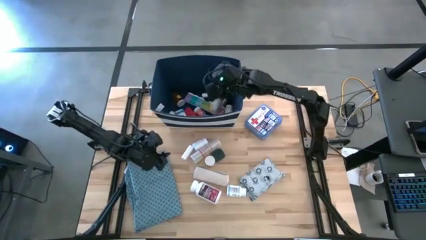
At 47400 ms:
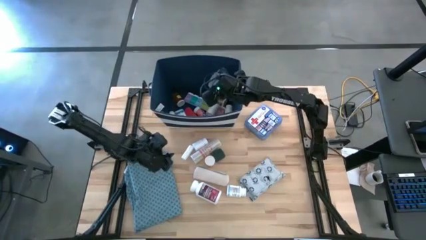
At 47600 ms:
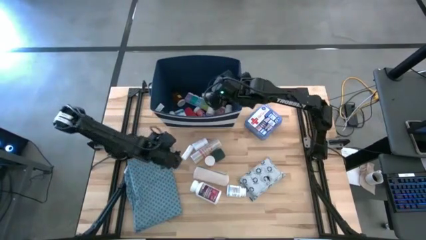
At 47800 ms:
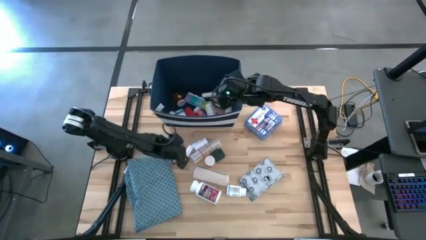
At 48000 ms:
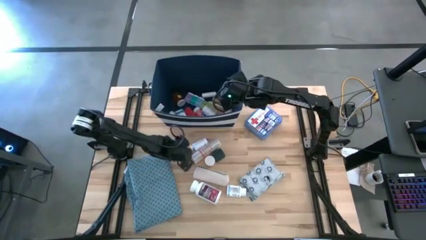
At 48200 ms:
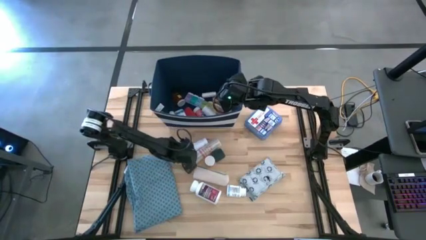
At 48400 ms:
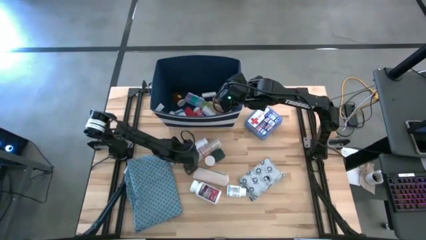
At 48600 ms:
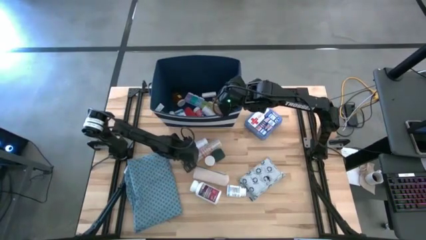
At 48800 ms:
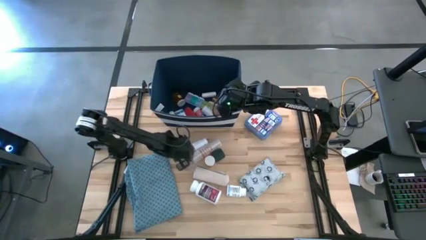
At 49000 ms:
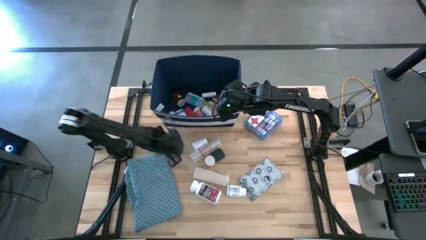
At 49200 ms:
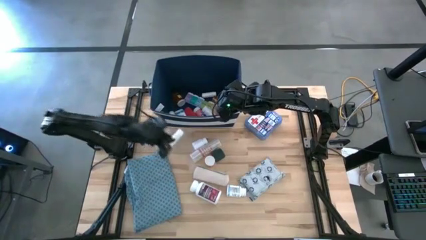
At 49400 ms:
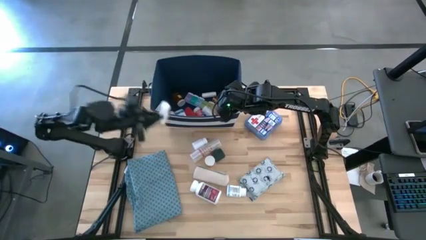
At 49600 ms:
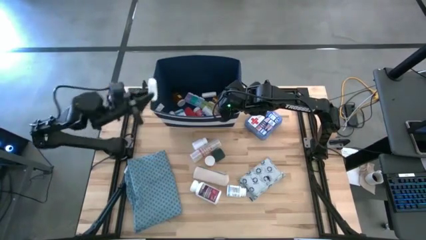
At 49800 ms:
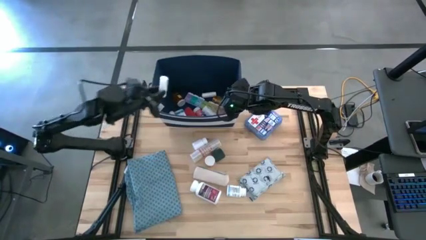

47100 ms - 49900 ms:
Task: Pick & place medical supplies in basket/bin
Put the white rolled gauze into the blue bin

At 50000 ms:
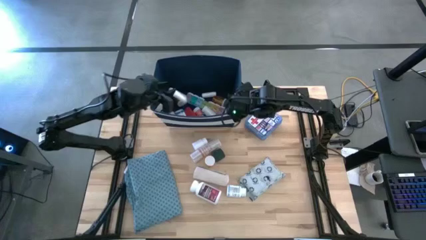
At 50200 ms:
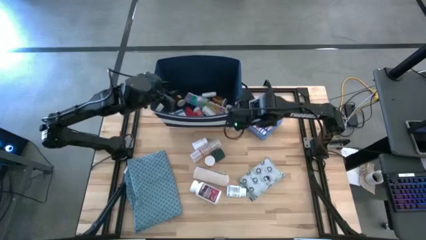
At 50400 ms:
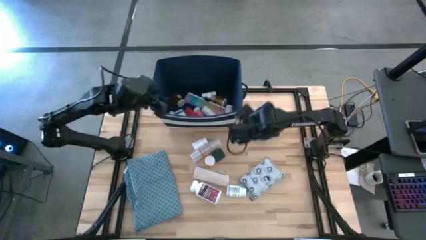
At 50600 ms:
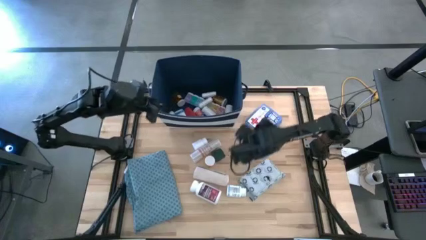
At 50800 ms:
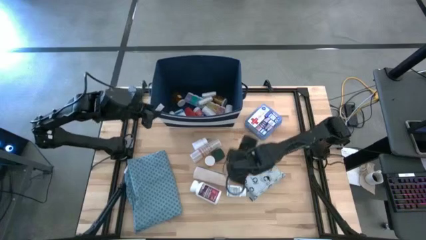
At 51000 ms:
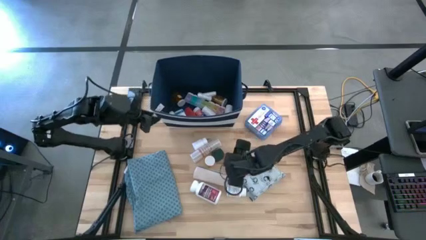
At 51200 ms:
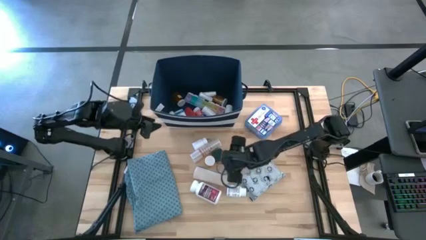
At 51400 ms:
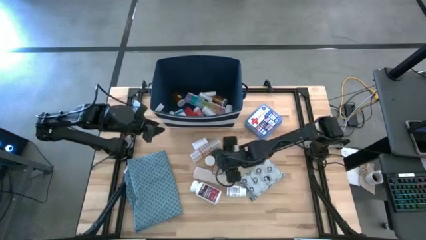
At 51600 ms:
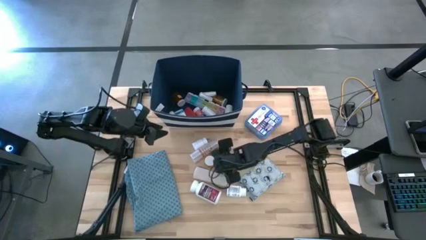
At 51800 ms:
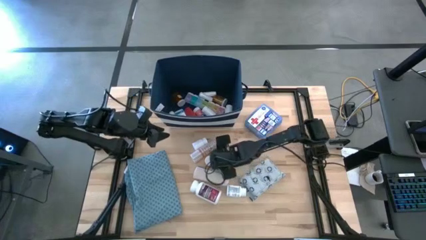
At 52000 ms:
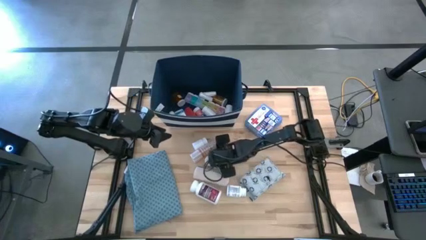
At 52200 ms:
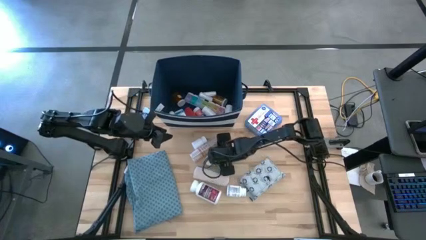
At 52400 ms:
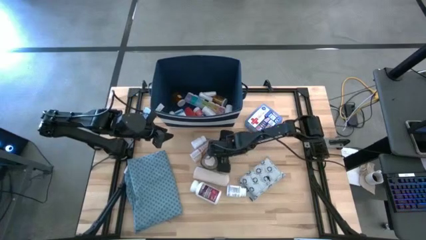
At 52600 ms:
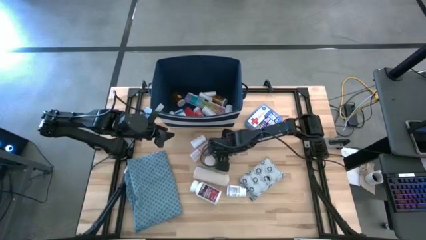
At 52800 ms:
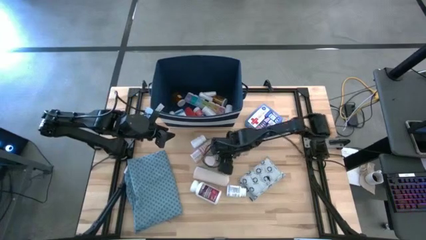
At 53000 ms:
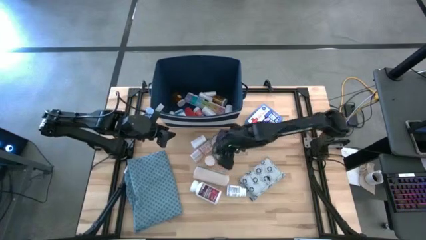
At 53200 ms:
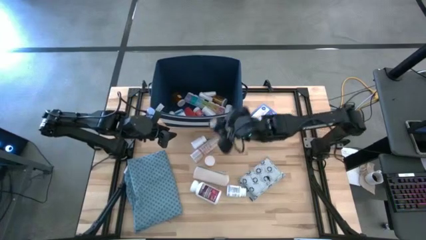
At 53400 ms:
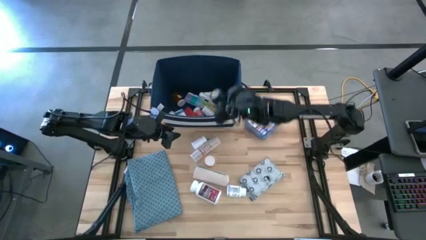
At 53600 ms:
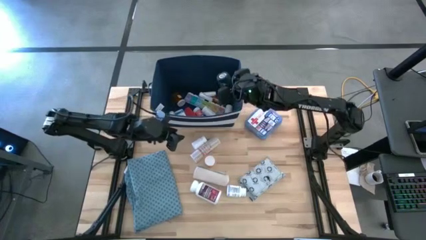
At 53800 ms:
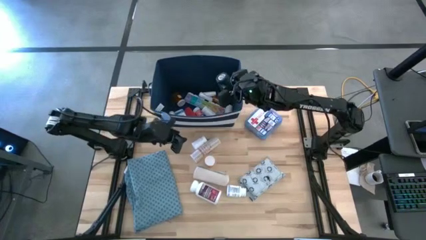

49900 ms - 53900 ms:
Put the green bandage into the blue bin

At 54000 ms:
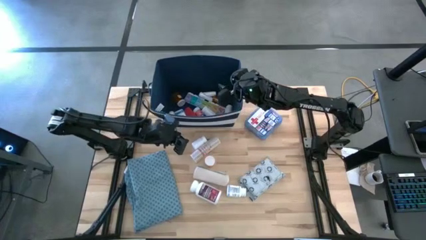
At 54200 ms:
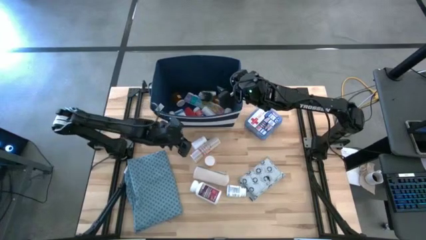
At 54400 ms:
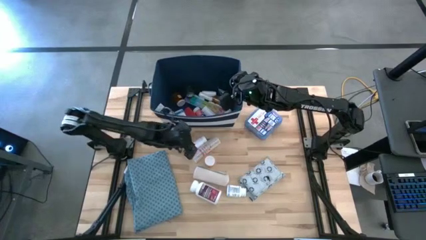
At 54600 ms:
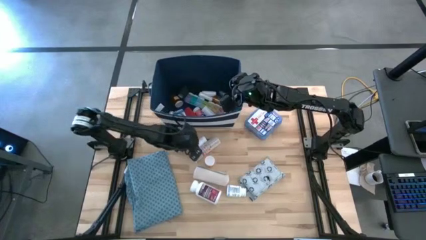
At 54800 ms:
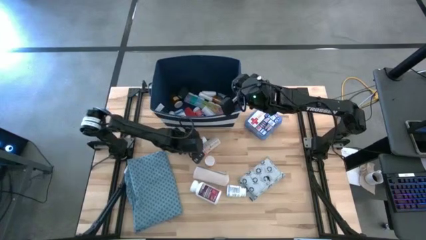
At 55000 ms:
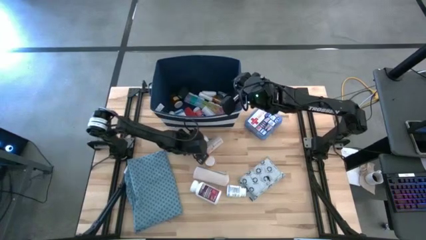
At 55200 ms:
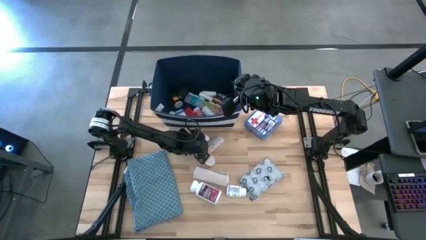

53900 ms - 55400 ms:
Put the small white pill bottle into the blue bin

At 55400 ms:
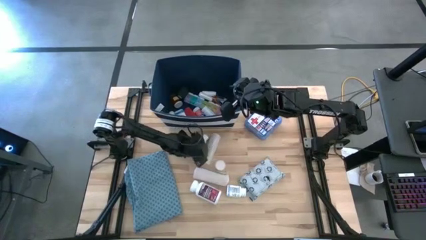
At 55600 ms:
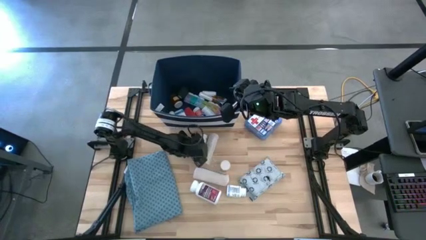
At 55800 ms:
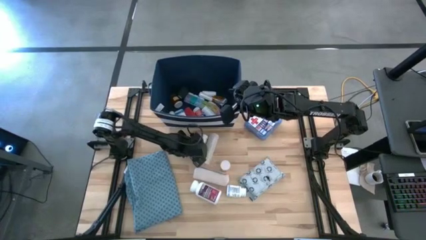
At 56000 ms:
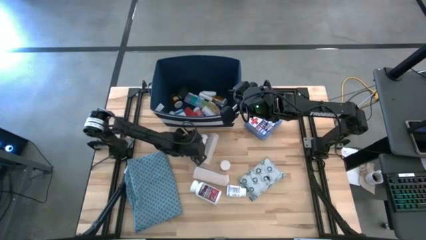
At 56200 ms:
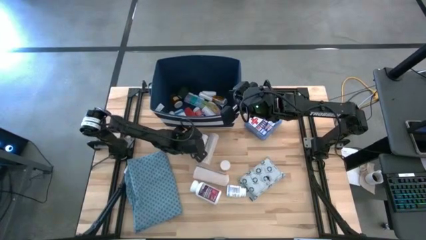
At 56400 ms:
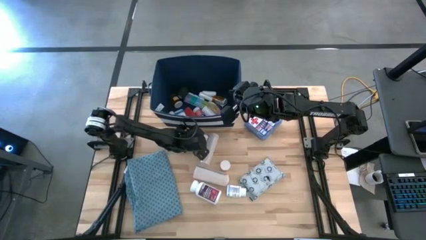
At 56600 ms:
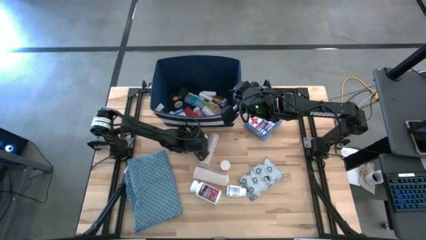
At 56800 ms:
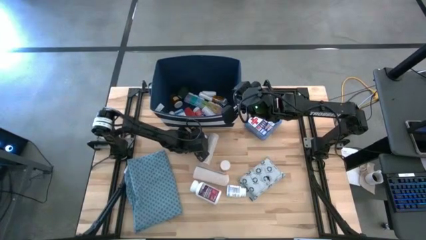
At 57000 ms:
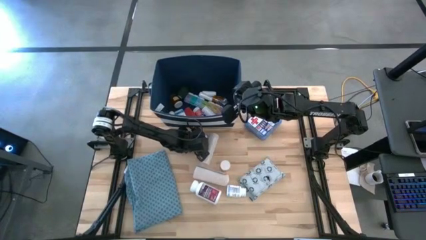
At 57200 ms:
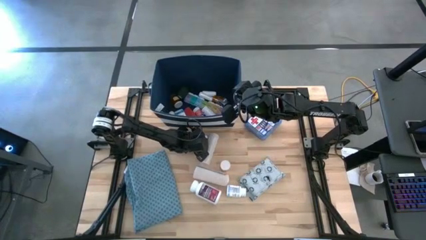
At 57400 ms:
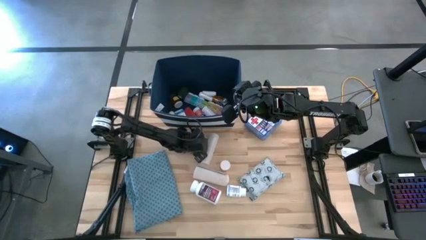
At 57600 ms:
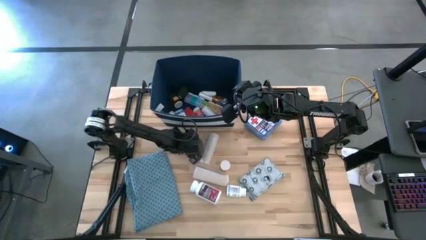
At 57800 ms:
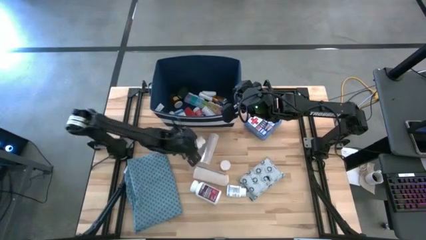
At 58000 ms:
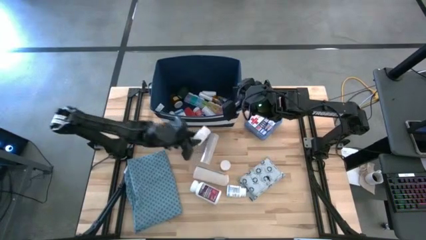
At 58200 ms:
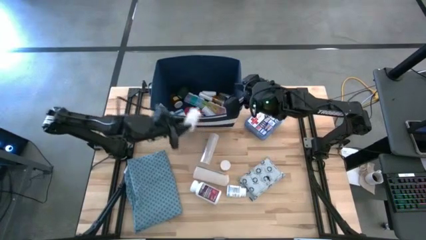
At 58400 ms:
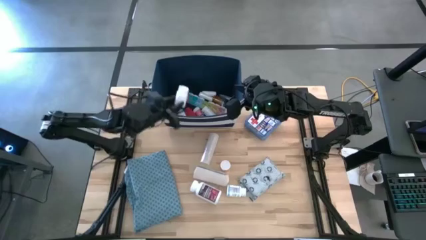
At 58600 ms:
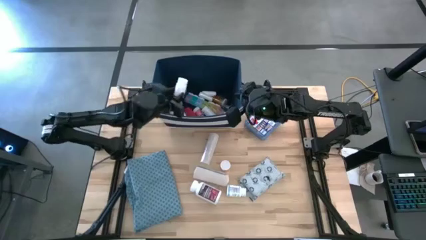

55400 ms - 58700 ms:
Put the small white pill bottle into the blue bin

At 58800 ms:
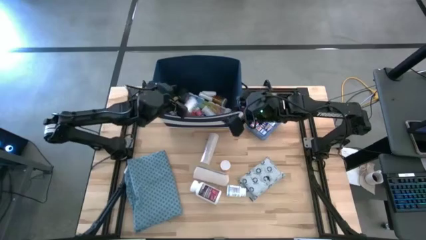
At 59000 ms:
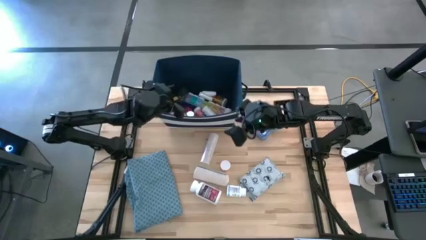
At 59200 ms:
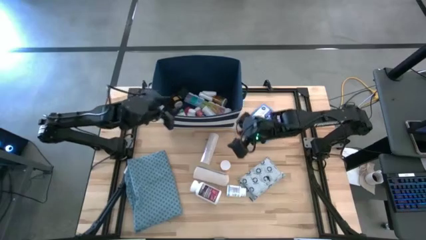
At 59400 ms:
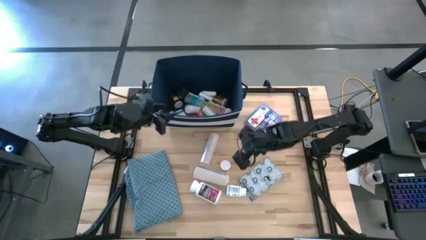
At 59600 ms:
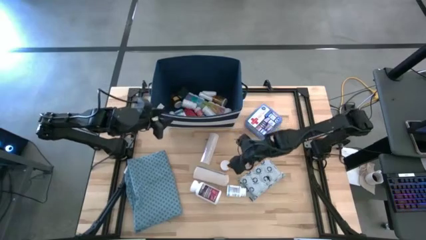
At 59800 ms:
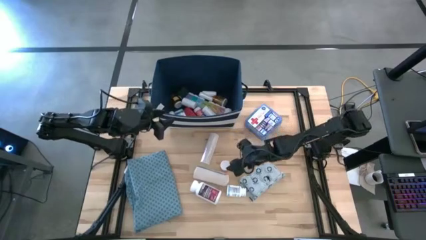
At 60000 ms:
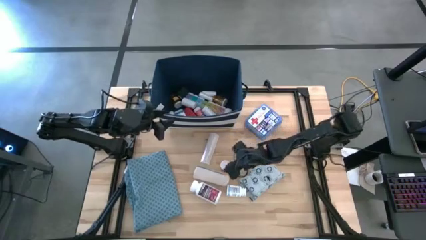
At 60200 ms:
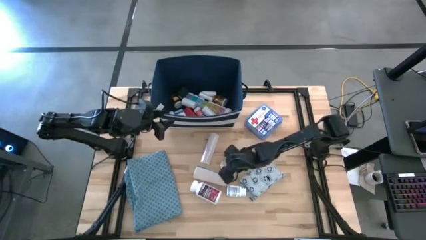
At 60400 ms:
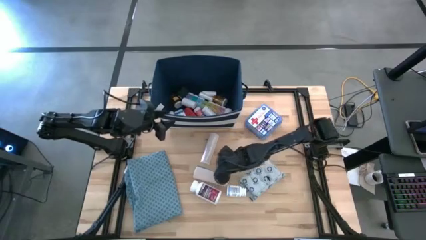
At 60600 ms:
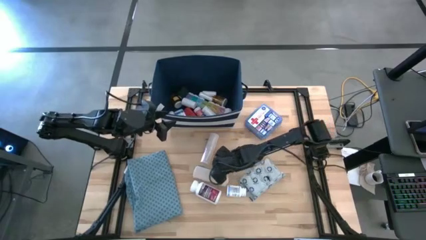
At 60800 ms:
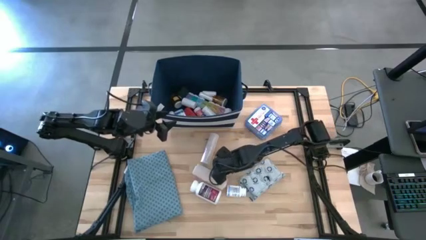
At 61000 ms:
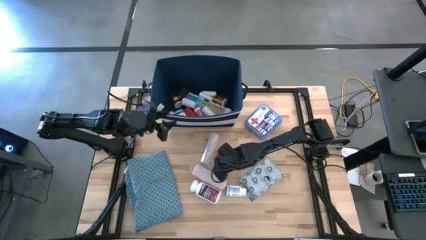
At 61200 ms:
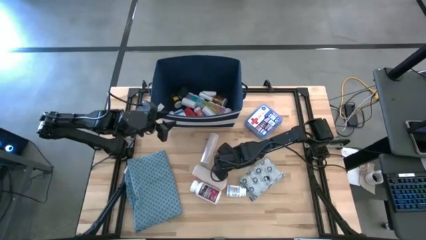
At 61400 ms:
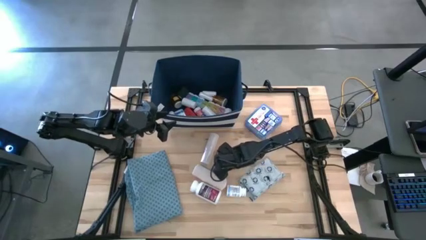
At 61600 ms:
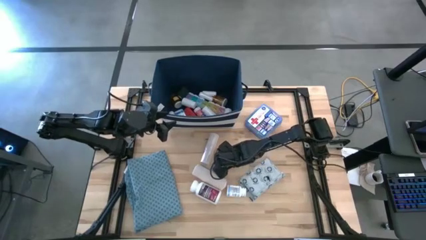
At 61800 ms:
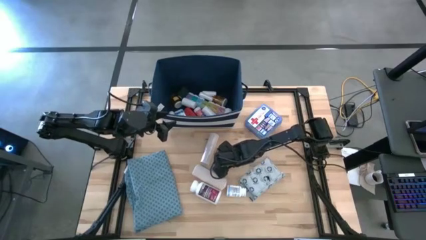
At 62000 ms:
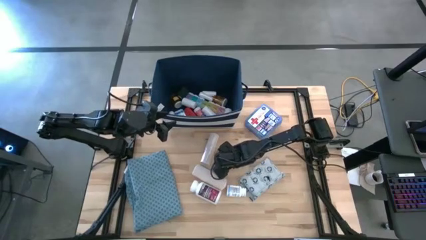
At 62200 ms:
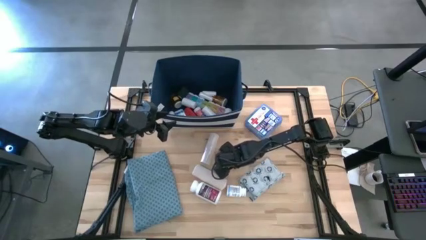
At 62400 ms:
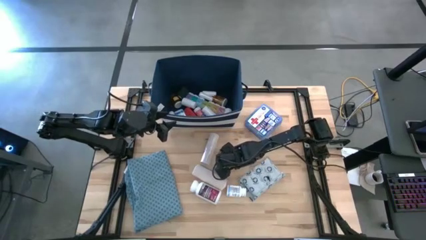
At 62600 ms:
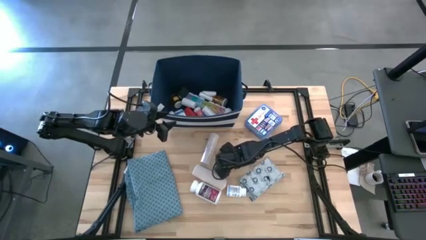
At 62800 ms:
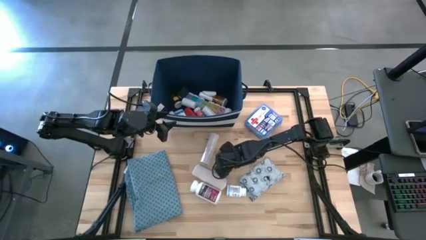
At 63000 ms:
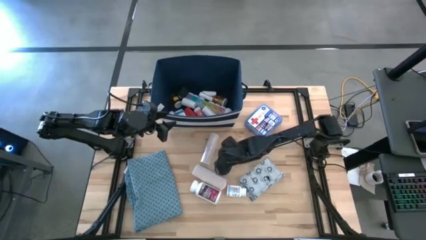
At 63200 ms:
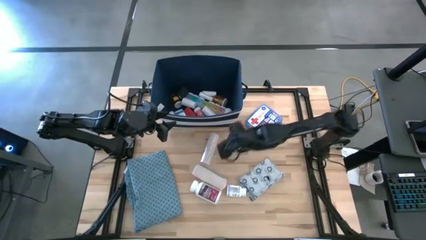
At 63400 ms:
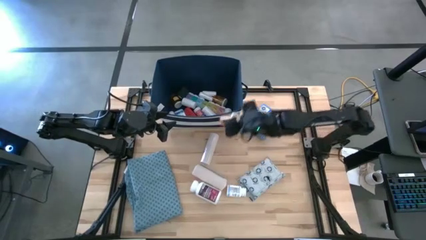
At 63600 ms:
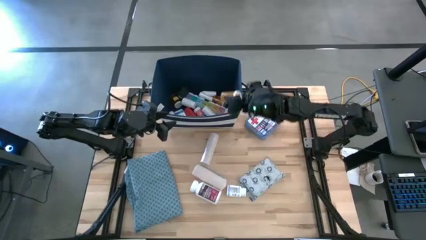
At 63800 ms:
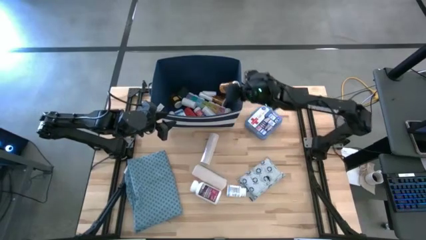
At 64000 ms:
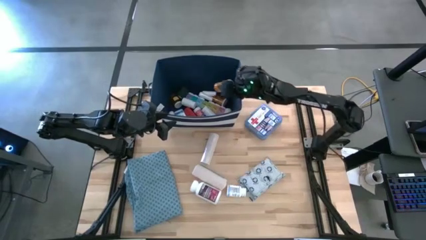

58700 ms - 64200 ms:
Put the orange pill bottle into the blue bin
